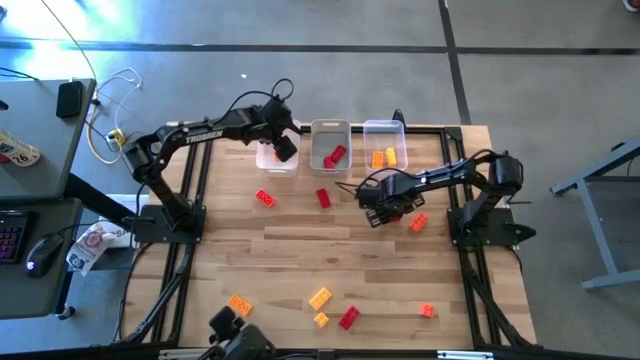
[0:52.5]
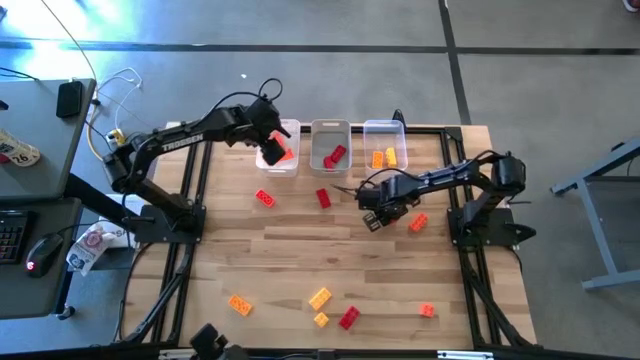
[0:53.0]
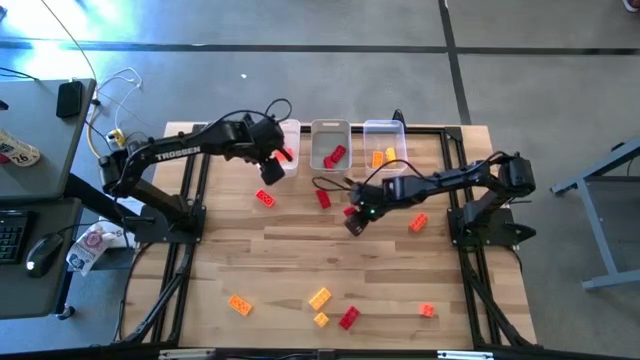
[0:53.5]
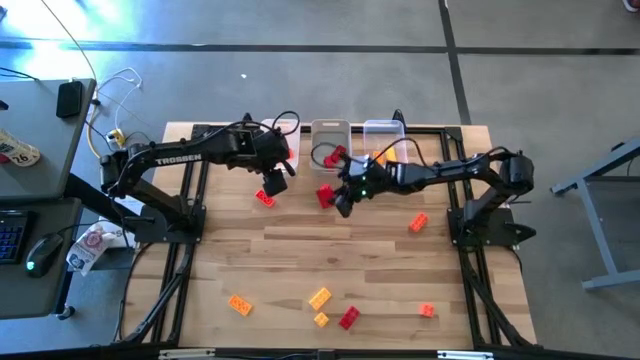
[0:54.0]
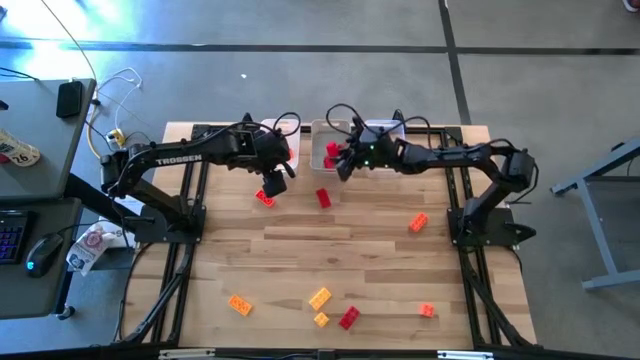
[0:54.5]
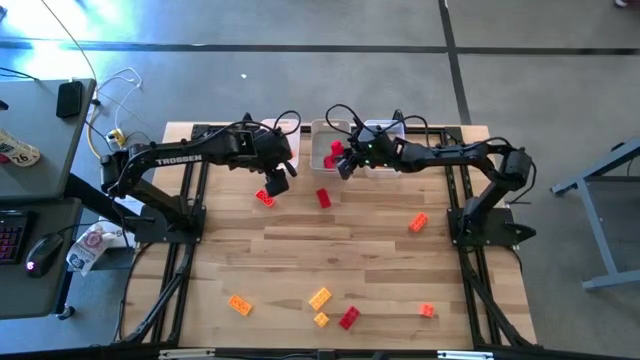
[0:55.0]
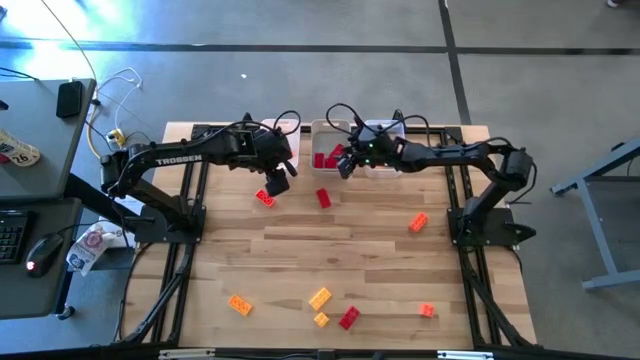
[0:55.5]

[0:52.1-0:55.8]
Task: Sort & place blocks by color
Put the red game piece into the gray bin

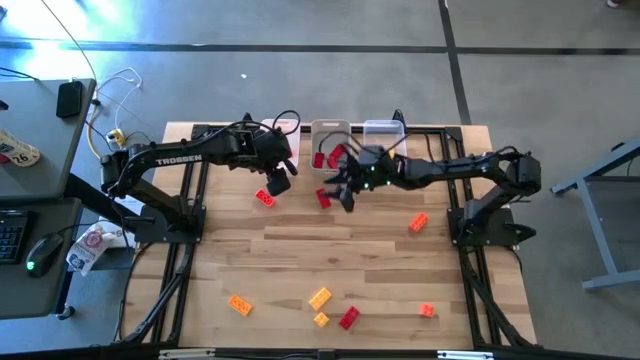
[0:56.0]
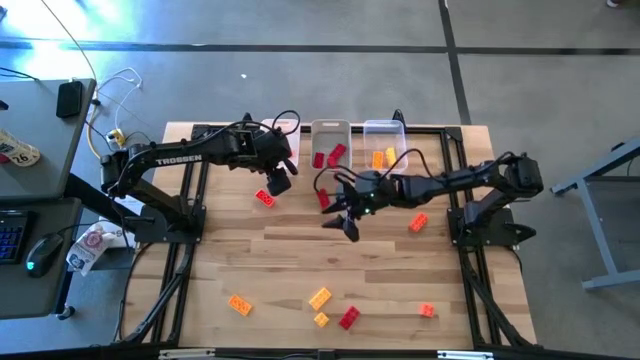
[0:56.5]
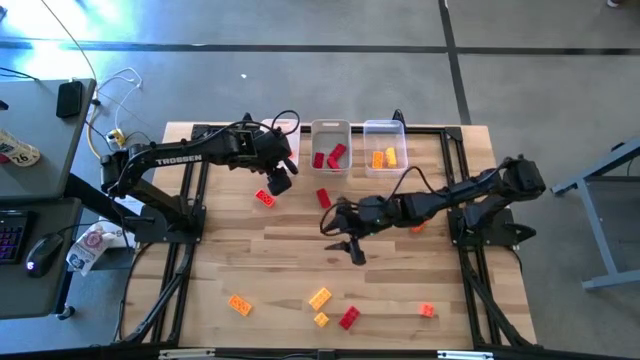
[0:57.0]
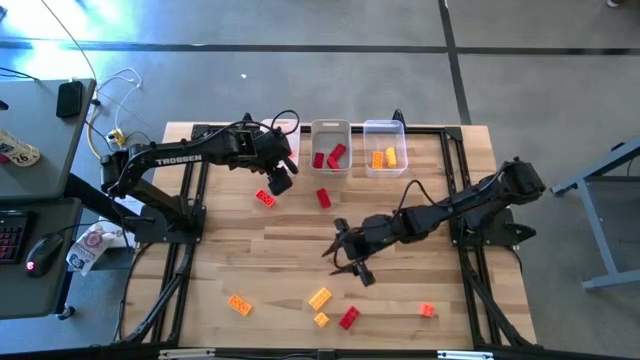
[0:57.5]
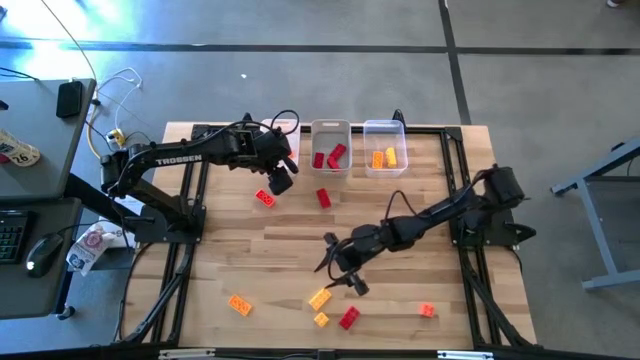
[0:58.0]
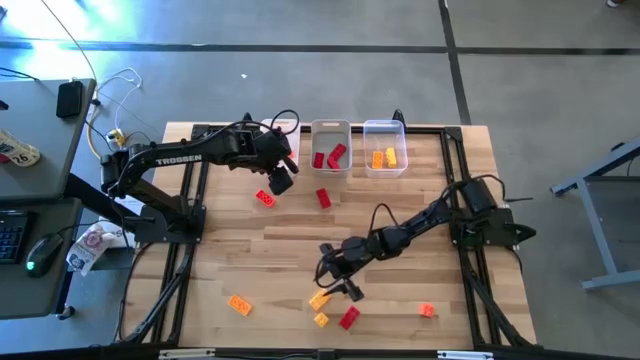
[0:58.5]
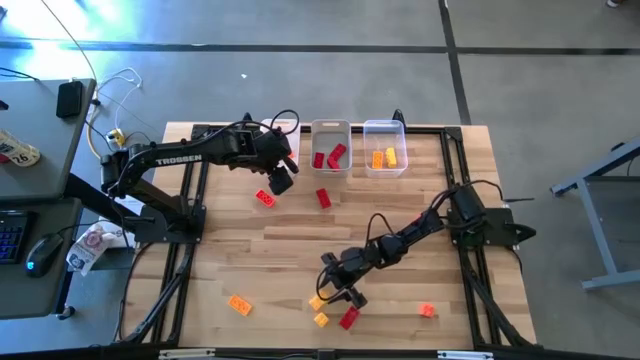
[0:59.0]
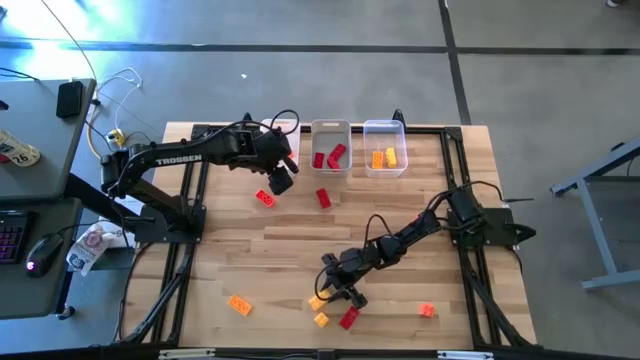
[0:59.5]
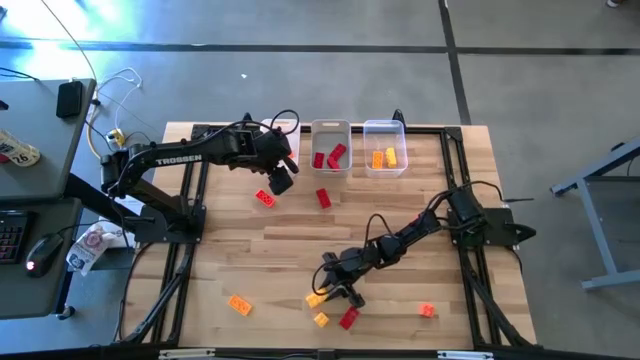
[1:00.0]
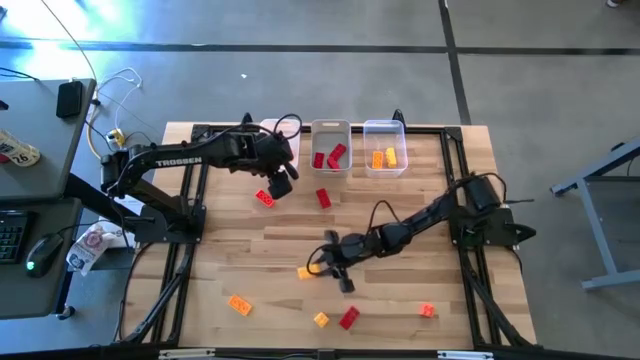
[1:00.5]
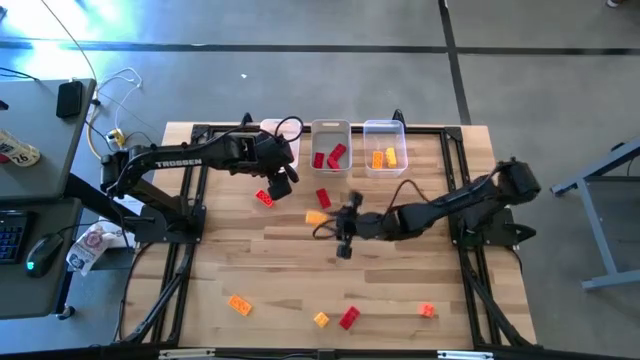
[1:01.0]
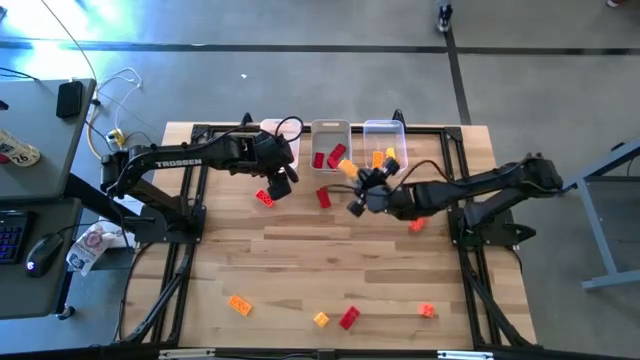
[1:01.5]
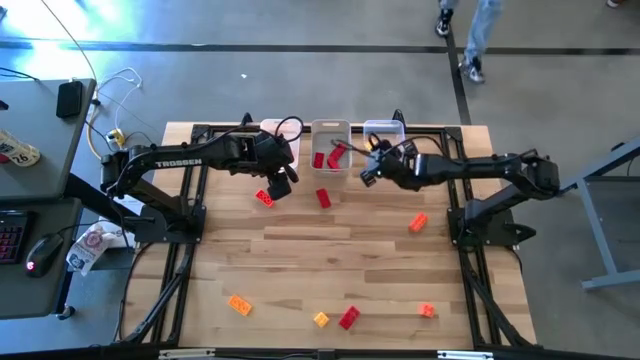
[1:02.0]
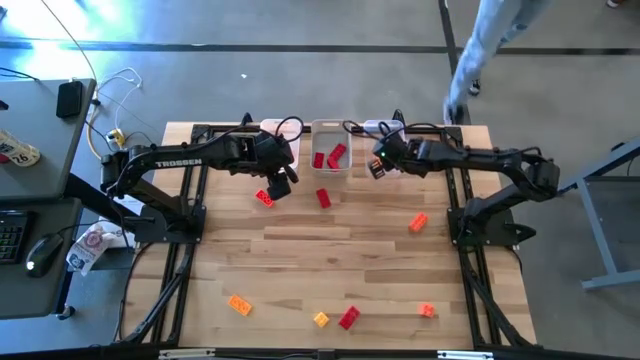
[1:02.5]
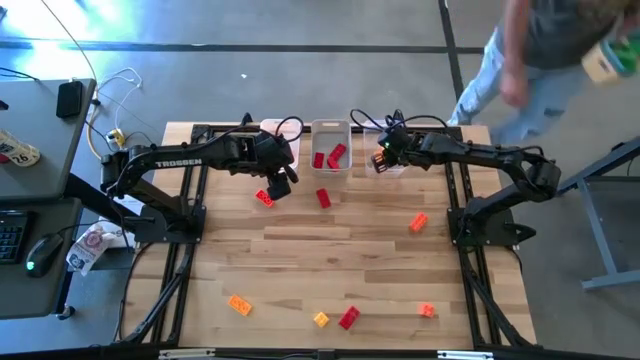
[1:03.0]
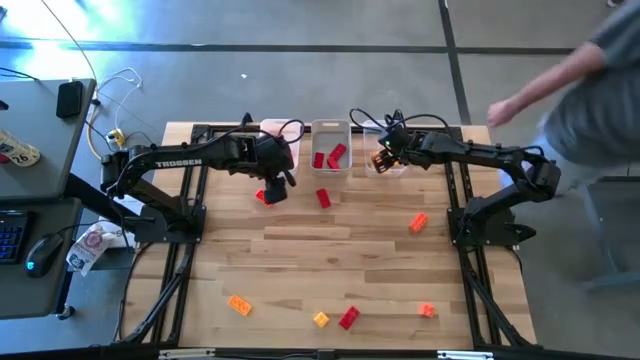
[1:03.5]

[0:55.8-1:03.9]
Put the yellow game piece into the transparent bin

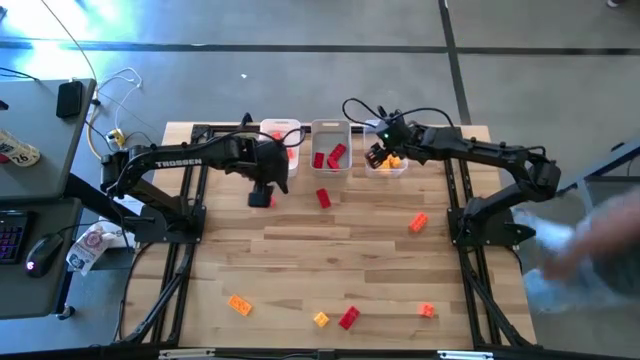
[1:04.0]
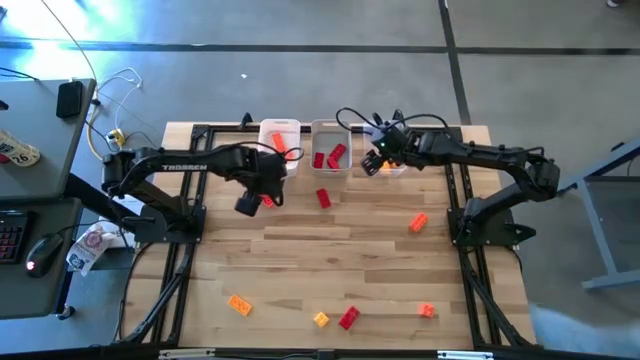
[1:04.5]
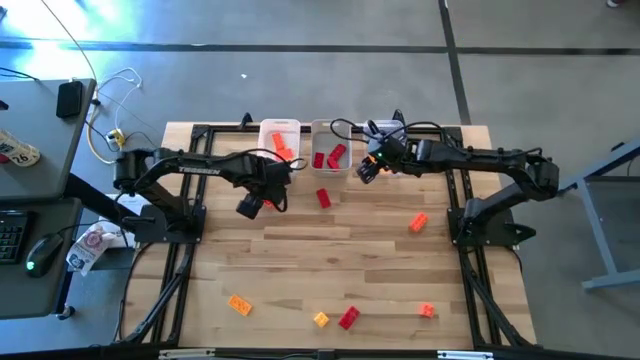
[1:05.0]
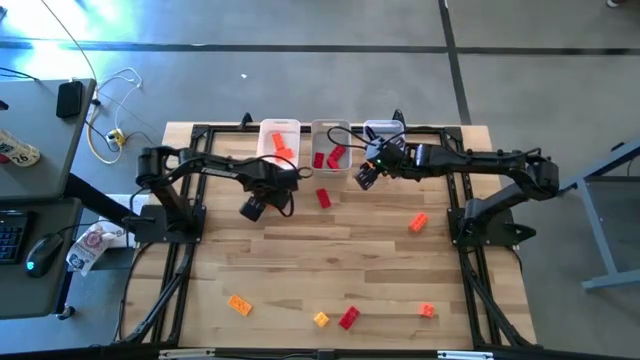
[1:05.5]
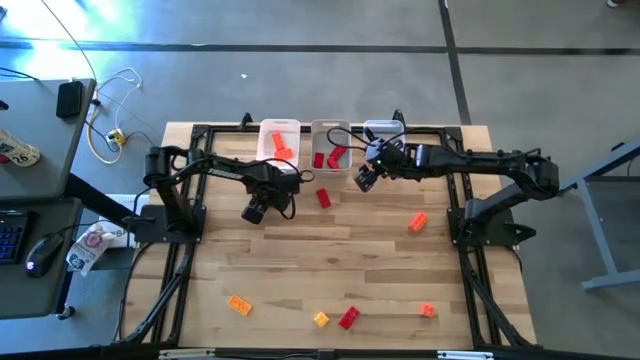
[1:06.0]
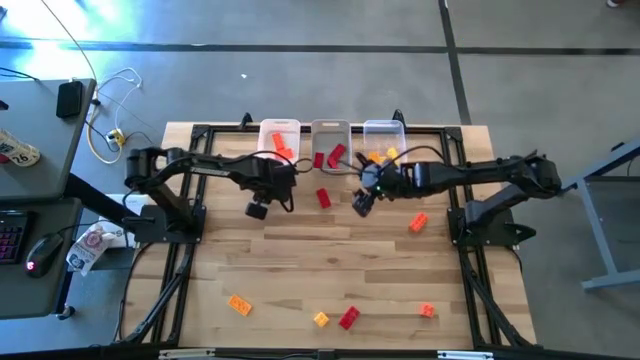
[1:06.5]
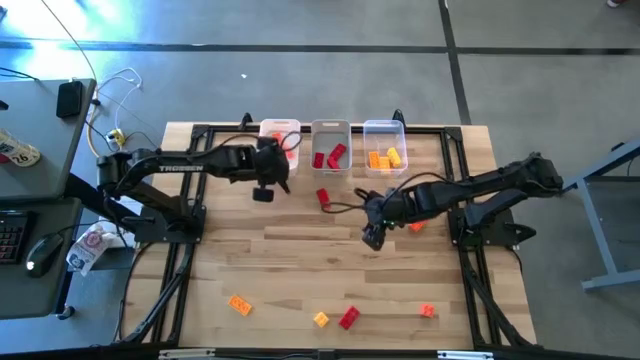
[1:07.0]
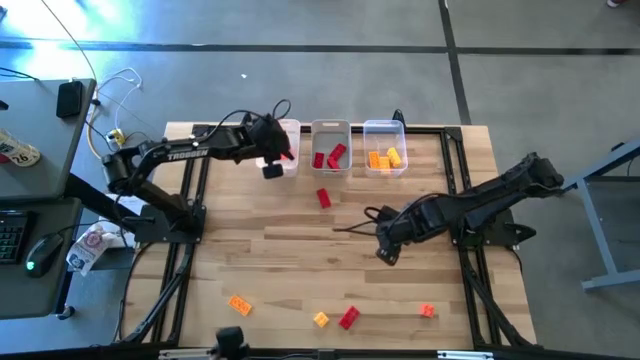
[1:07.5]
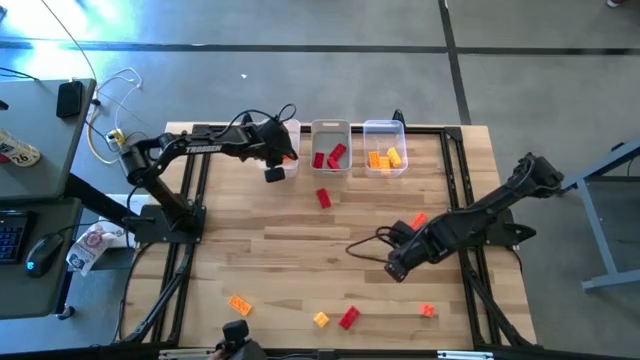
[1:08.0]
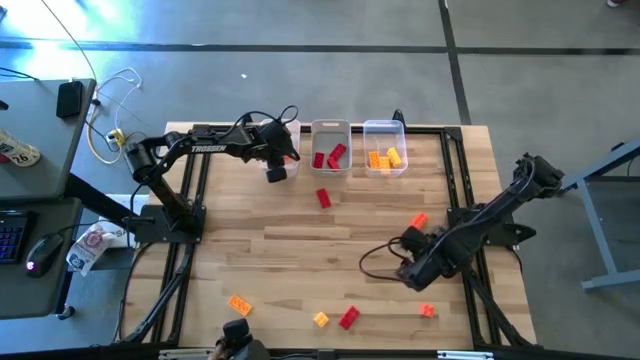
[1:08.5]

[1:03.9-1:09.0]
Put the orange game piece into the white bin

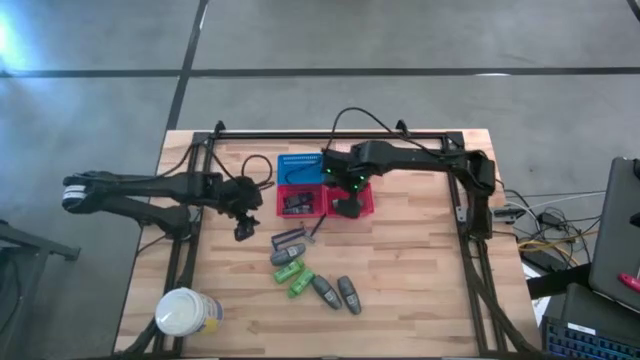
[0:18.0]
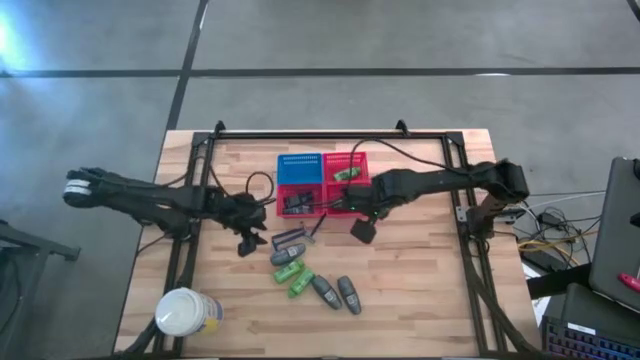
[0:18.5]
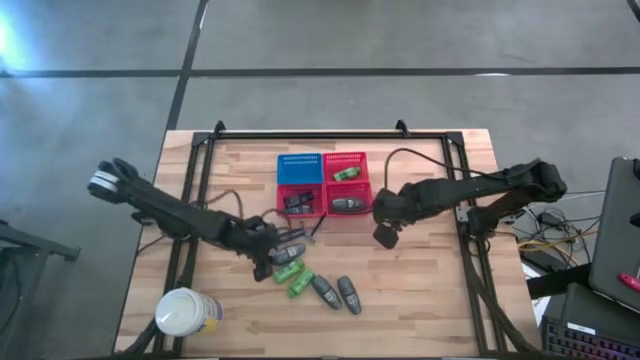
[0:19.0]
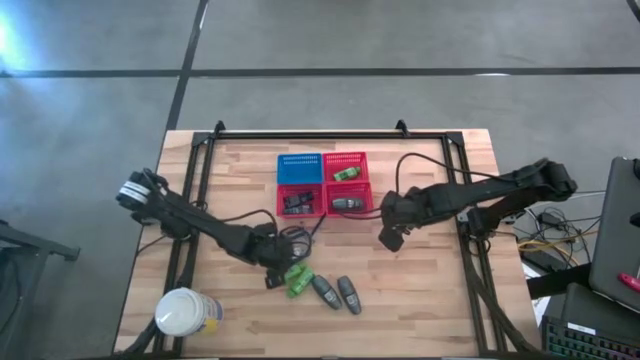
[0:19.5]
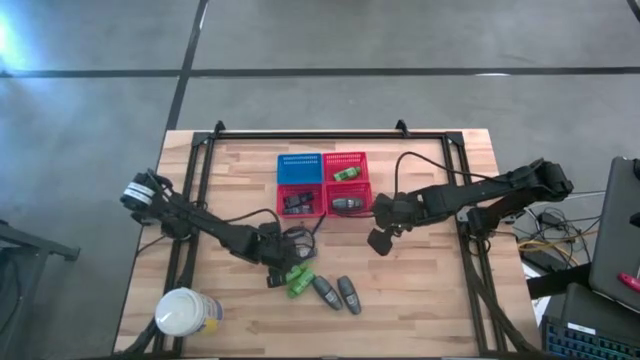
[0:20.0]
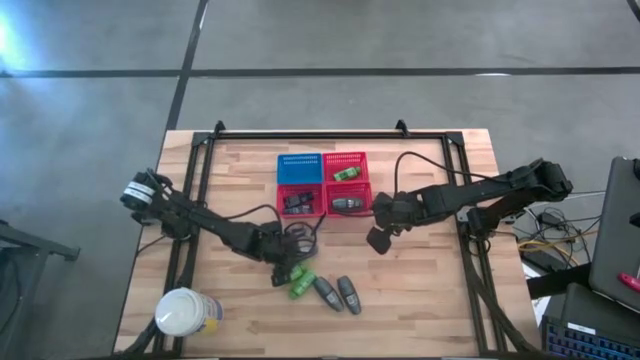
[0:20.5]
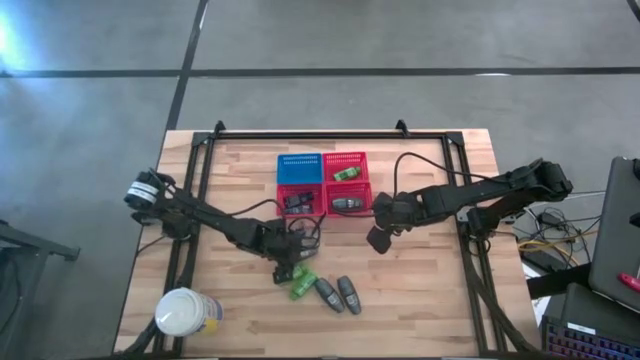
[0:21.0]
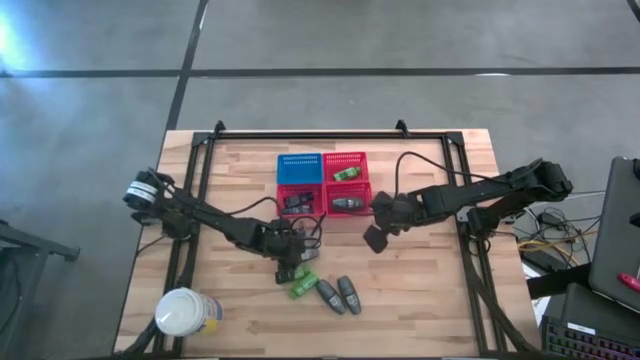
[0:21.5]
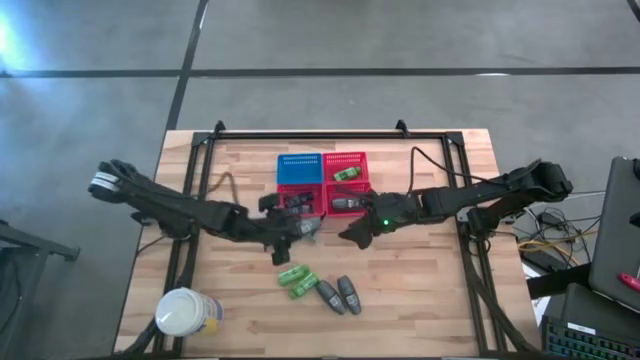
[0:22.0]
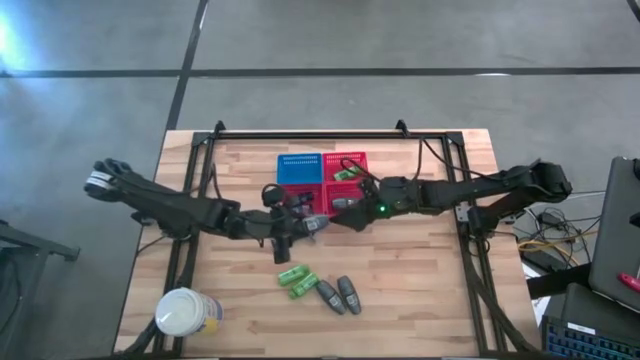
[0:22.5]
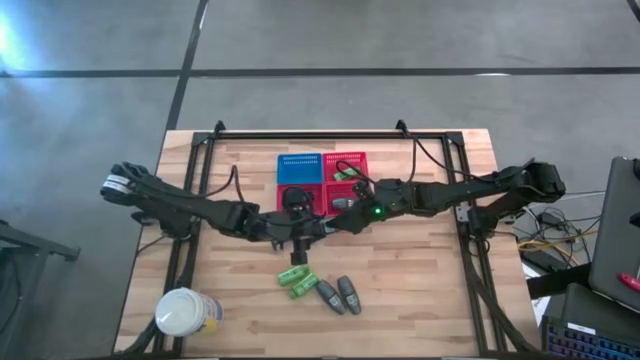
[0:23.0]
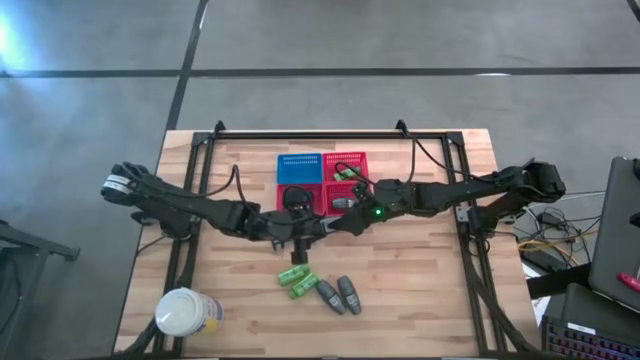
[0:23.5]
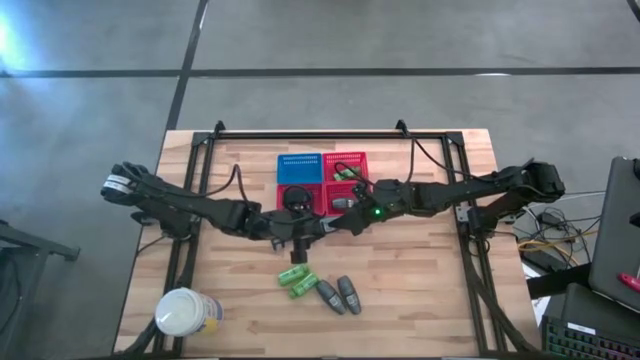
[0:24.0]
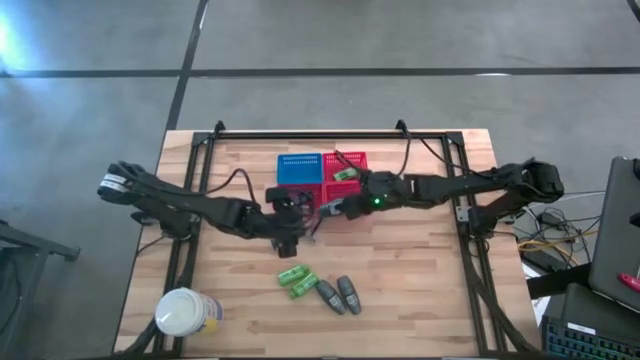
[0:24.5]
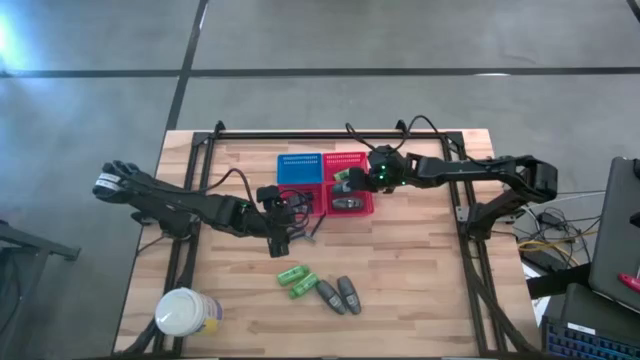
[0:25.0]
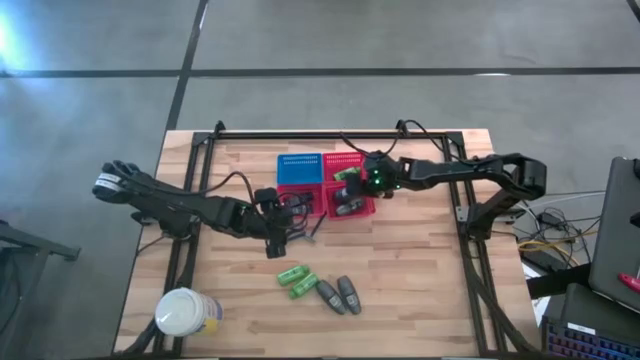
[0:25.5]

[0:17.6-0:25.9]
Task: Pick & Place Travel size toiletries
Put the deodorant into the bottom right red bin
